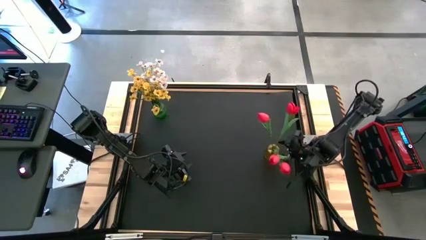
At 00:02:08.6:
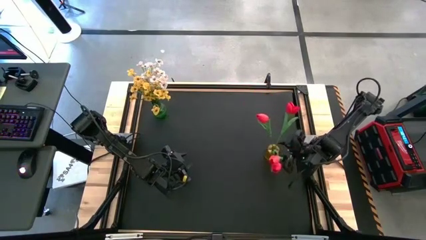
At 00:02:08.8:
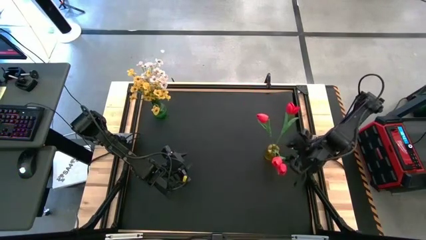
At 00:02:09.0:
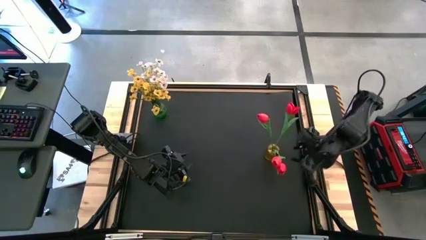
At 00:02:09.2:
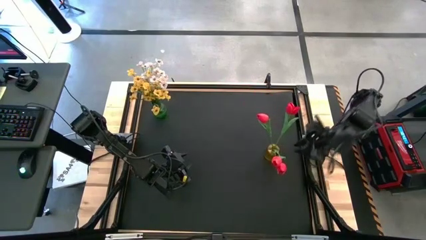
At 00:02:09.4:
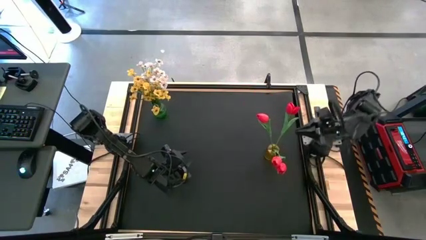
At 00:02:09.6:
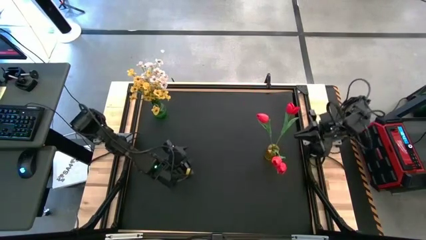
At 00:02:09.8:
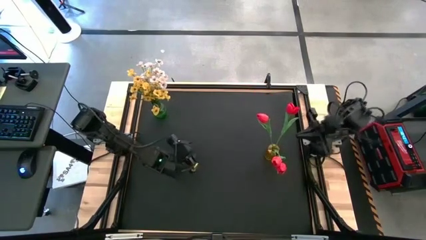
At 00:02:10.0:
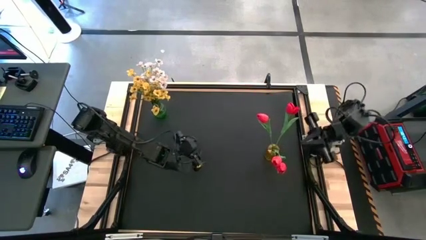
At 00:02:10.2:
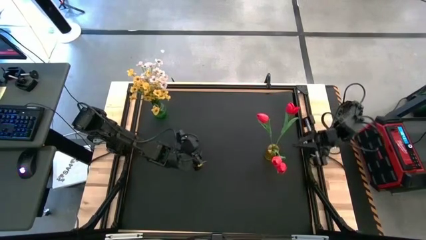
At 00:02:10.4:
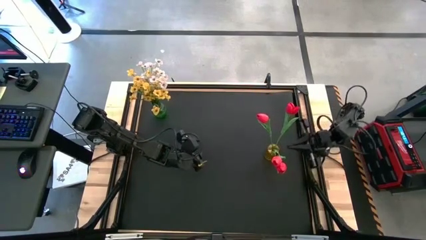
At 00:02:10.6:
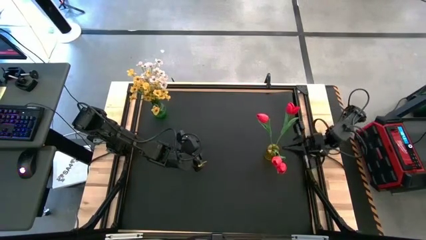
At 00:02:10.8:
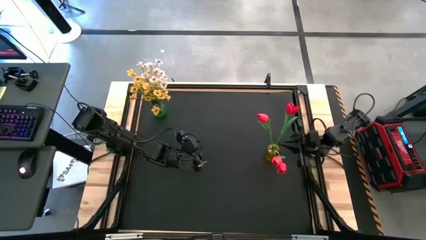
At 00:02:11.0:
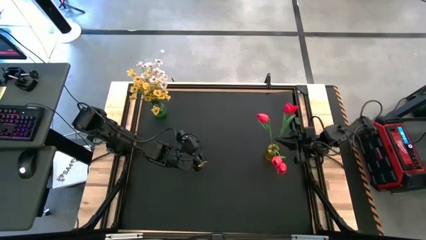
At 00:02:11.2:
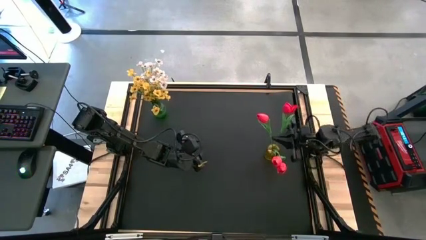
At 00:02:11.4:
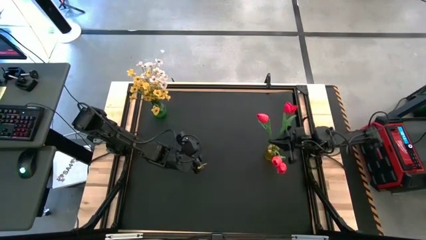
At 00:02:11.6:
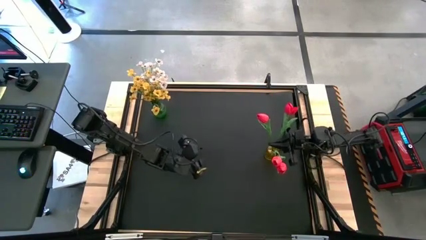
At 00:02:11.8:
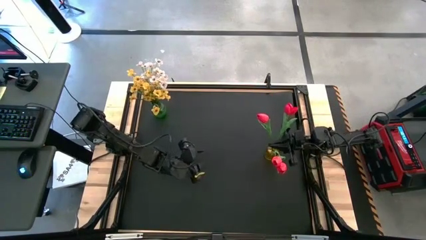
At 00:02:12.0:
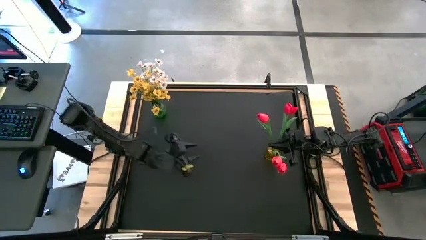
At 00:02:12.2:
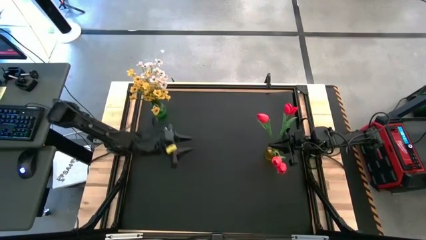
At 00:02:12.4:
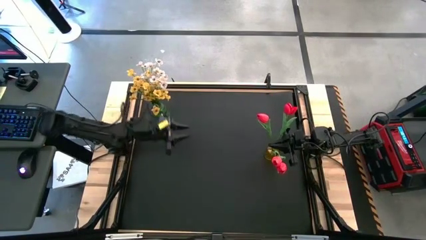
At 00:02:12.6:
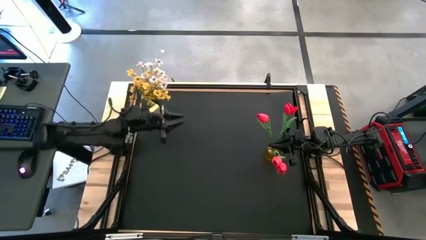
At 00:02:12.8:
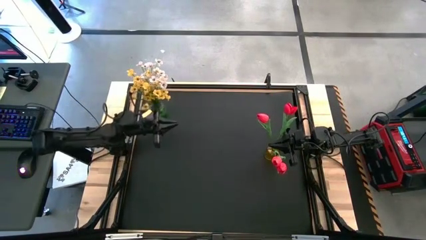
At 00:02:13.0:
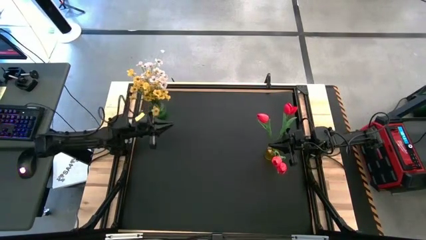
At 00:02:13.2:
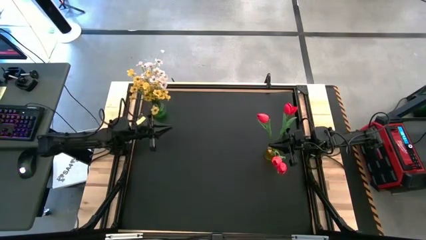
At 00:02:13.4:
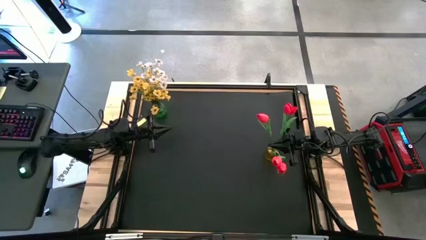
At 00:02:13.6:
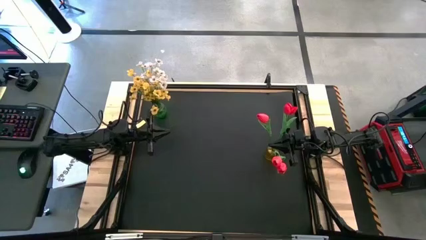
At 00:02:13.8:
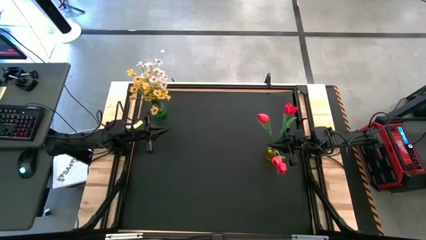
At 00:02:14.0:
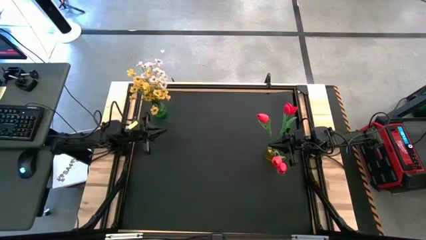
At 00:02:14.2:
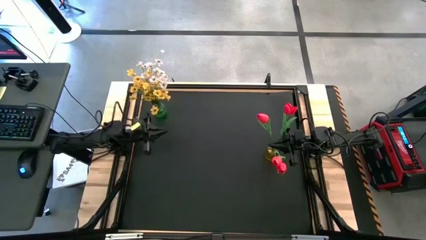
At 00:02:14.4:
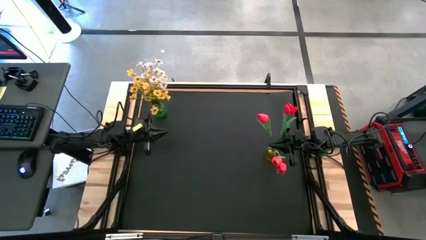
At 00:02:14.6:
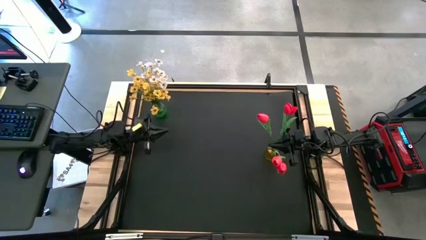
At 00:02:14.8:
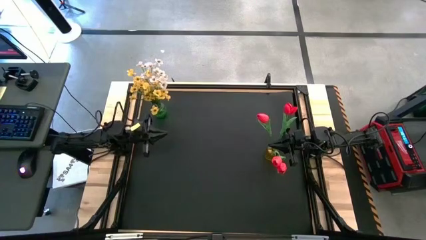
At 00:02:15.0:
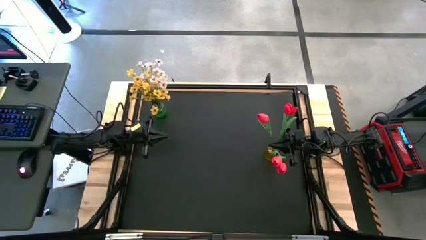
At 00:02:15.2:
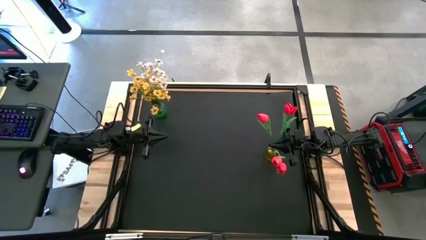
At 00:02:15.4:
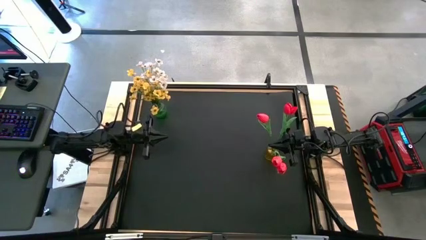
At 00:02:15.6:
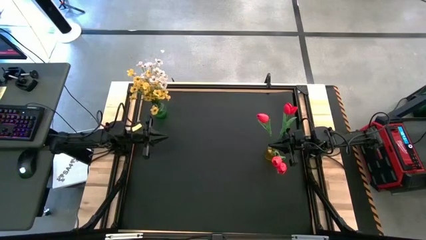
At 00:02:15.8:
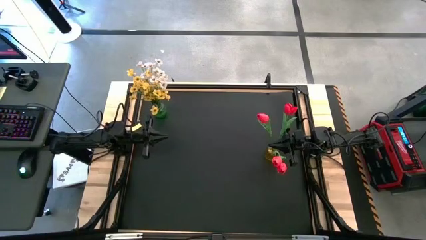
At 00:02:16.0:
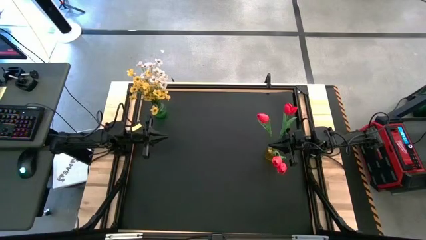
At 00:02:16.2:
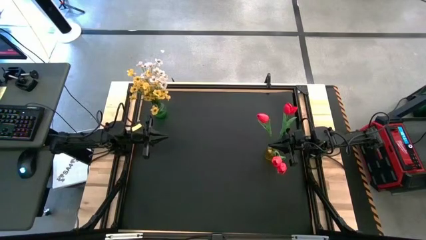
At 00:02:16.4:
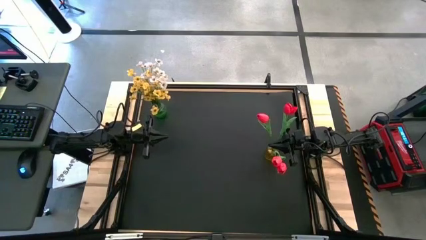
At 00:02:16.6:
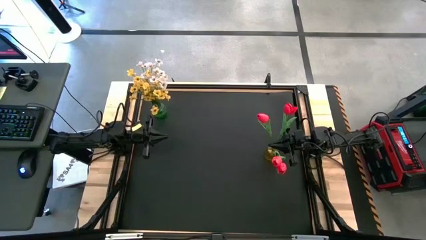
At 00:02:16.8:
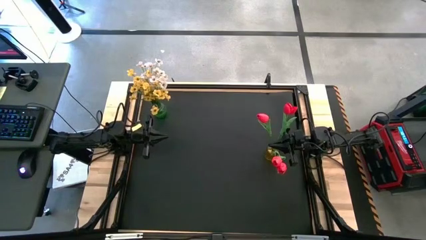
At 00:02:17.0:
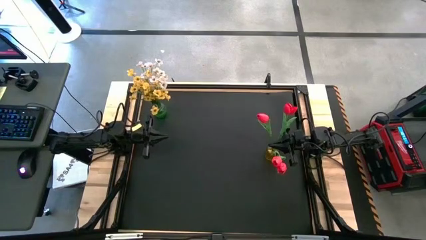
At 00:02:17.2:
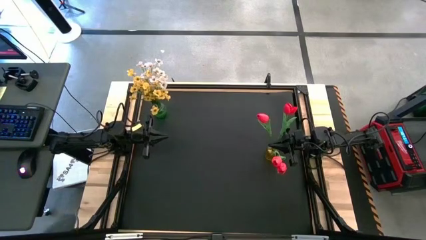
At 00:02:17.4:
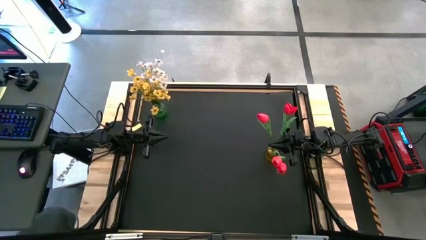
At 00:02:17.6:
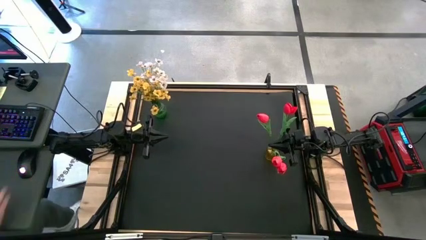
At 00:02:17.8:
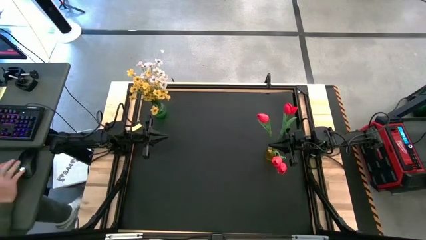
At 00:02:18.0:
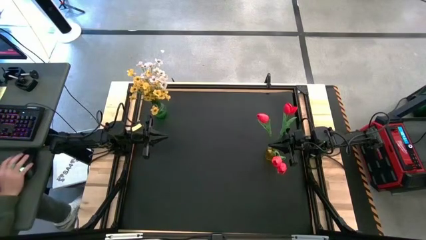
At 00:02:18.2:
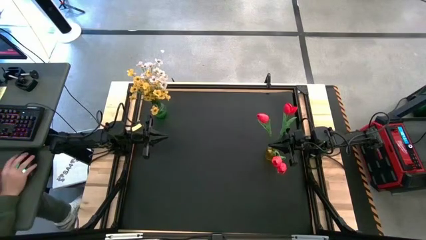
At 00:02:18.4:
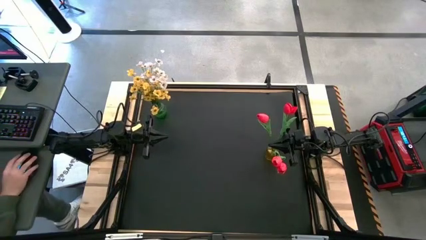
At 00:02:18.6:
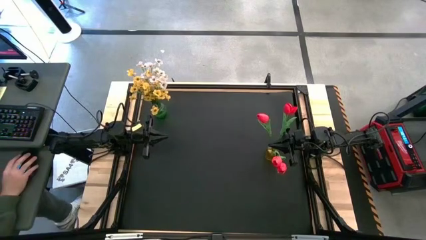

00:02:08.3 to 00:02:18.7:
Task: Sort flowers into vase by color
Return to Home Position

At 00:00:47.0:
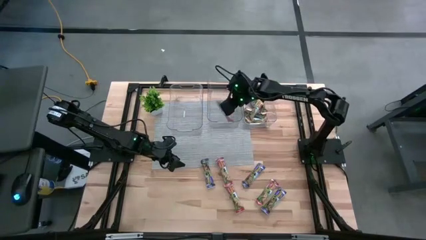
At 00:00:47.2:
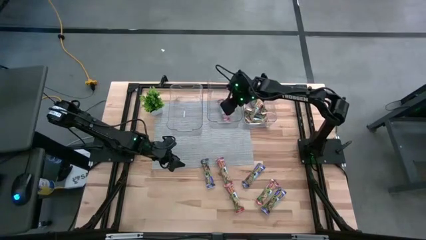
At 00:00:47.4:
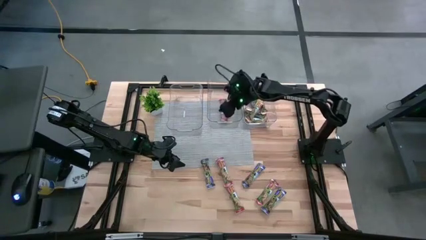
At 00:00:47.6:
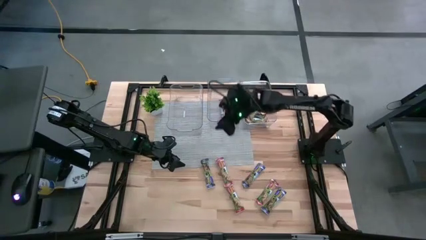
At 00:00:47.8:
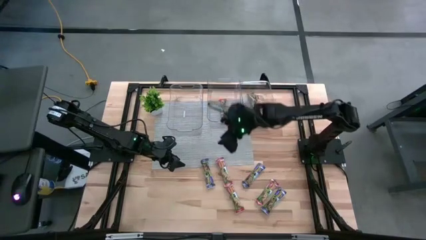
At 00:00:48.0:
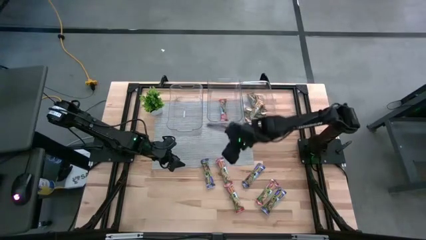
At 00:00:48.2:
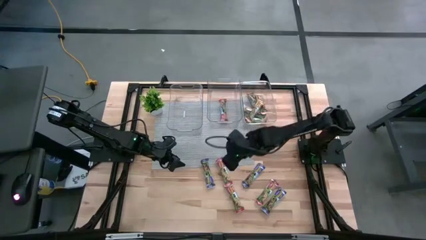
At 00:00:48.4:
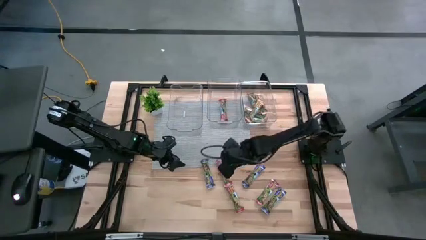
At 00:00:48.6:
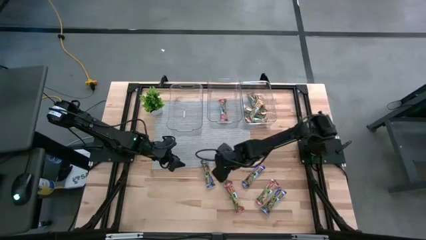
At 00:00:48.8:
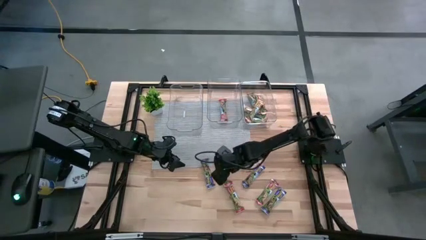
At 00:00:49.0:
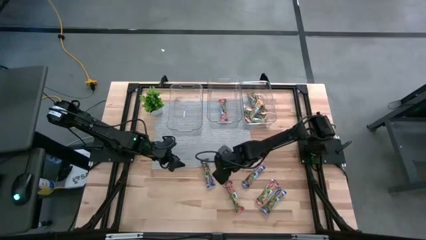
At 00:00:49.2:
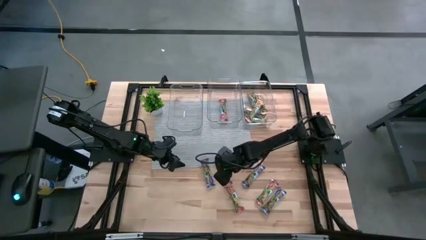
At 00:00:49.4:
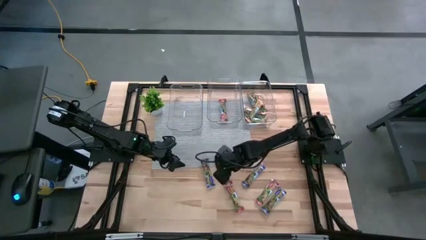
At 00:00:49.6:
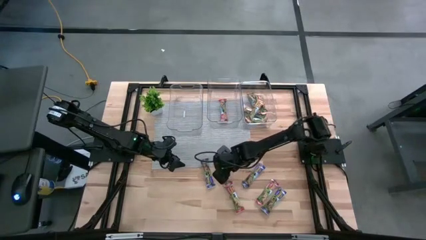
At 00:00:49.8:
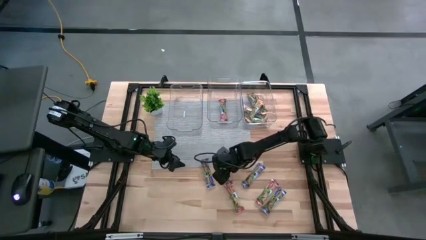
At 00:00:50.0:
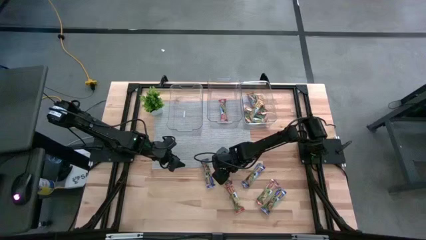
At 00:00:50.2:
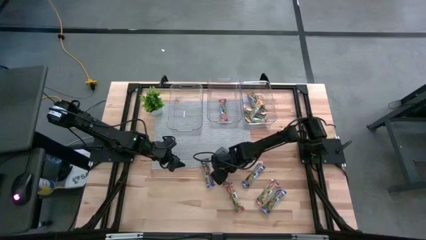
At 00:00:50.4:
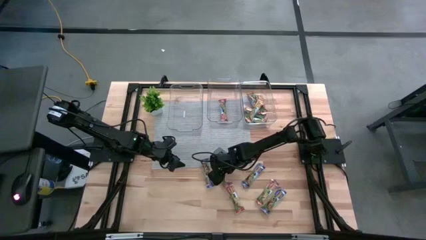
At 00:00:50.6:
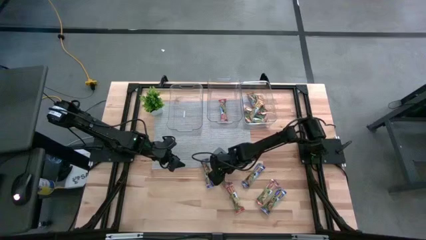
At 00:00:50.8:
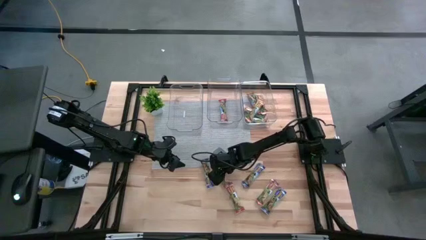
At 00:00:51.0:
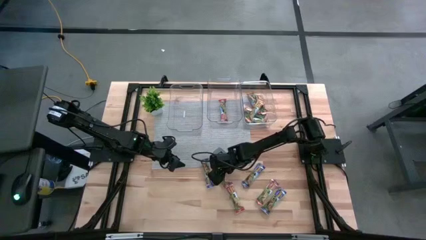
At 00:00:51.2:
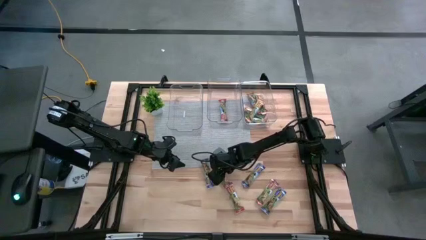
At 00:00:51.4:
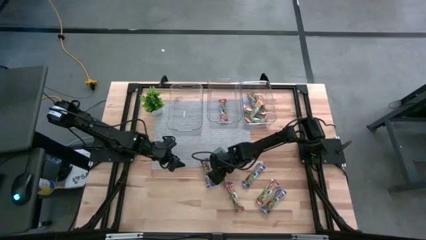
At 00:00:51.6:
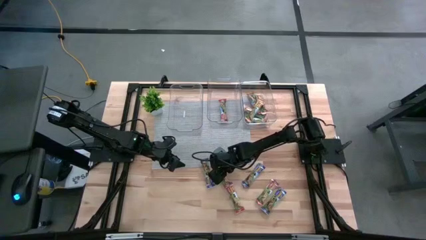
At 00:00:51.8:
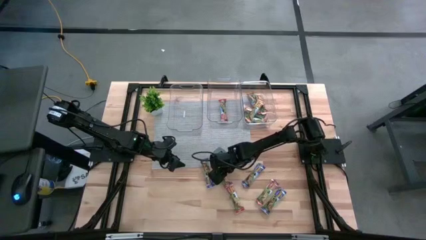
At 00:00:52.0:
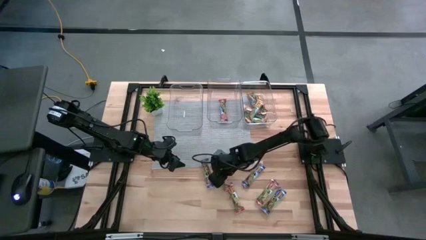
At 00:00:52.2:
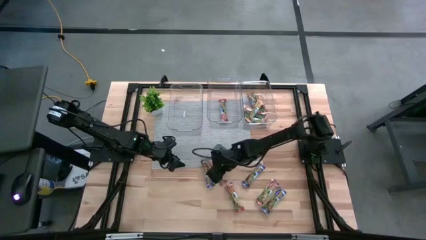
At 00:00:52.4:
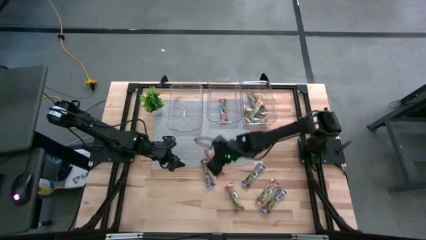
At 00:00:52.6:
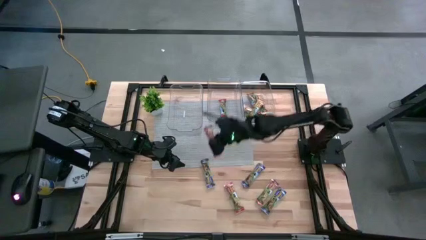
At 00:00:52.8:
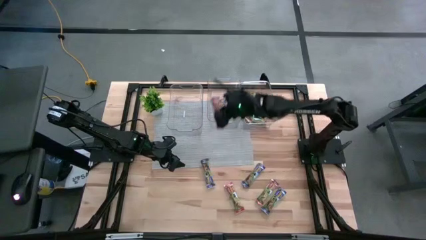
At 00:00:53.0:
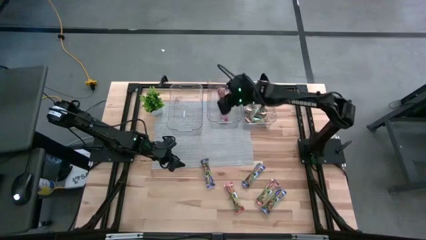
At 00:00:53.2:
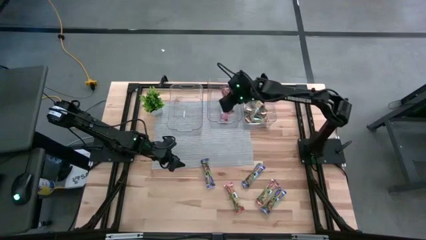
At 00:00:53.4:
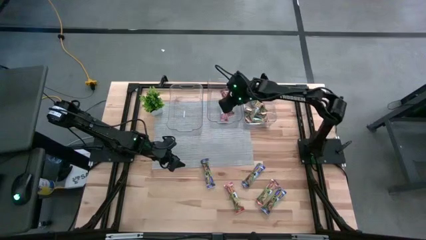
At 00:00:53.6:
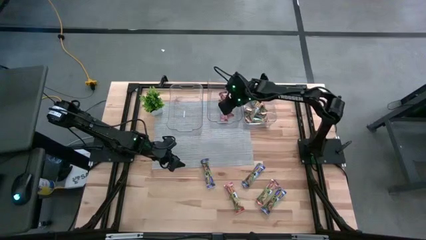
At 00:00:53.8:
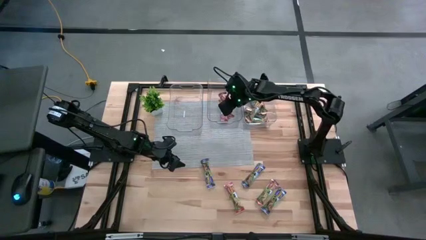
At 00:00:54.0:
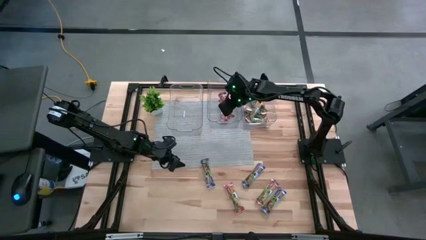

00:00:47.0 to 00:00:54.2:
Task: Pick and place Granola Bars by type
Put the red granola bar into the middle transparent bin
